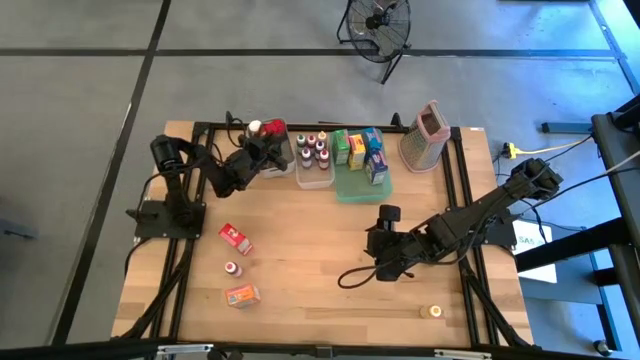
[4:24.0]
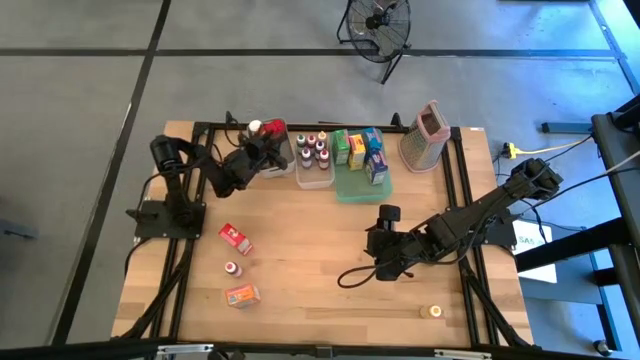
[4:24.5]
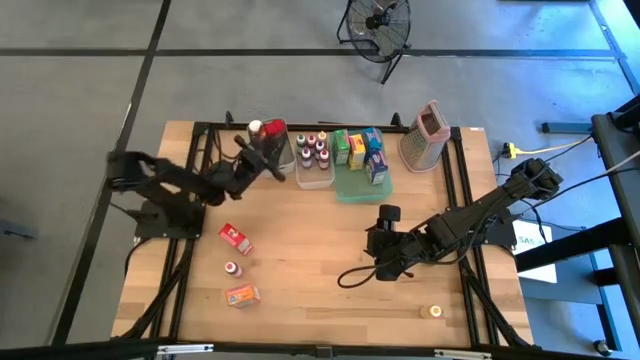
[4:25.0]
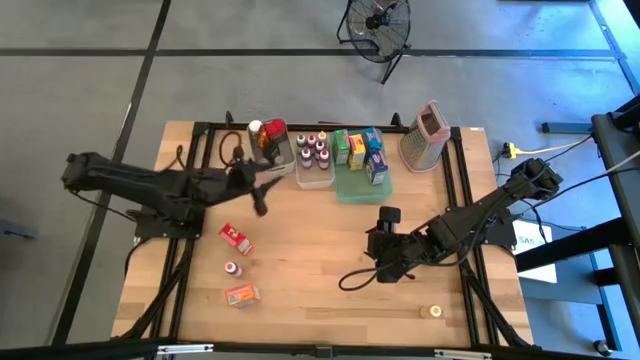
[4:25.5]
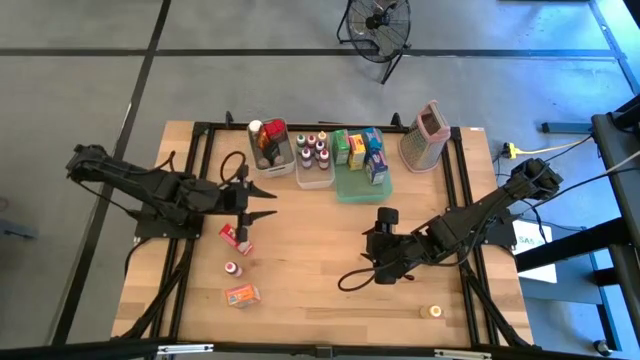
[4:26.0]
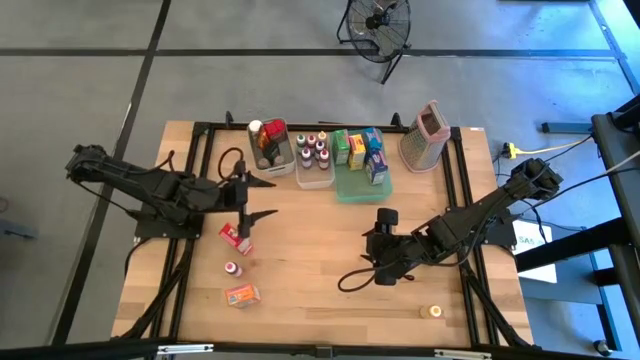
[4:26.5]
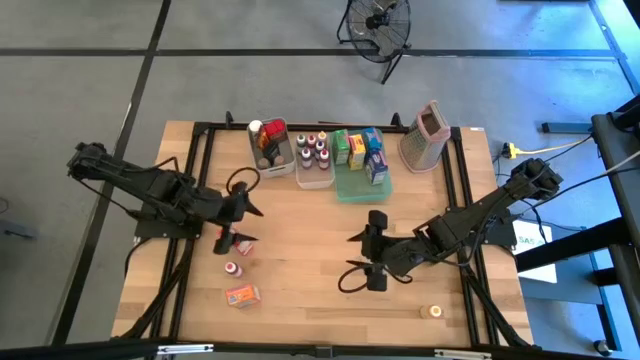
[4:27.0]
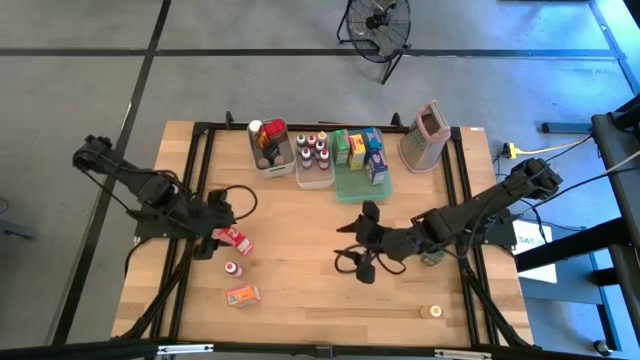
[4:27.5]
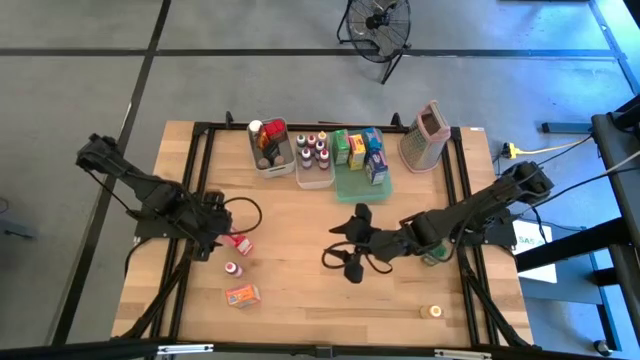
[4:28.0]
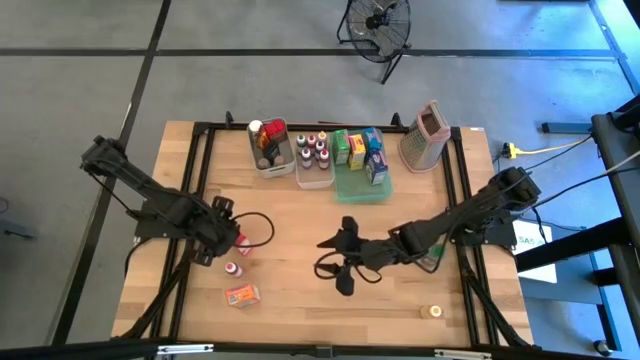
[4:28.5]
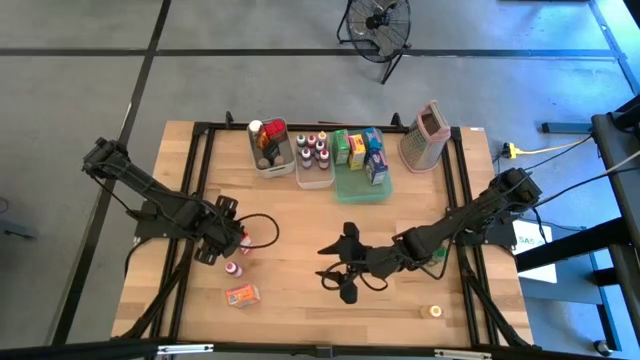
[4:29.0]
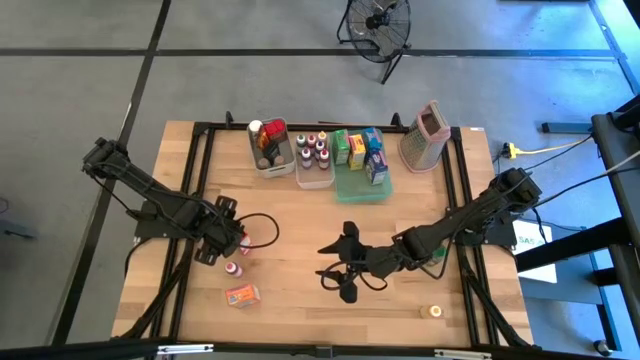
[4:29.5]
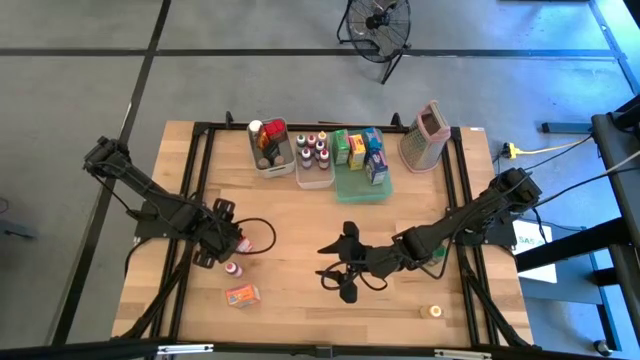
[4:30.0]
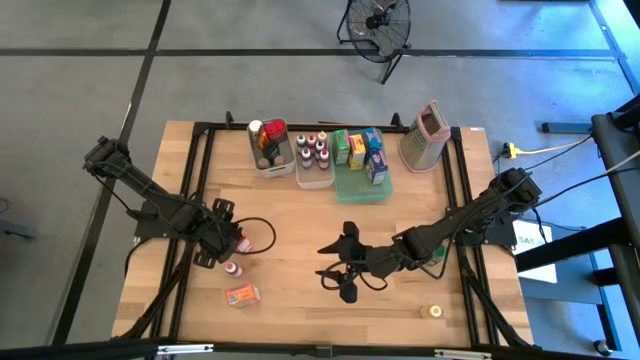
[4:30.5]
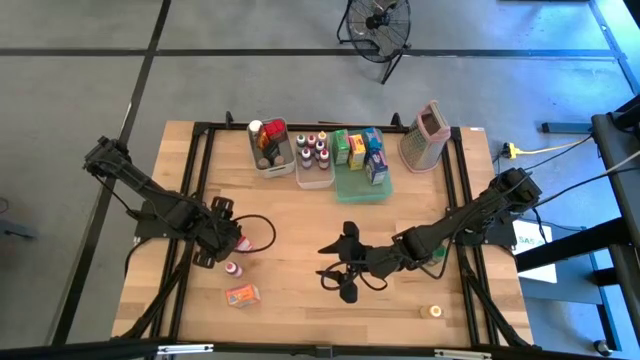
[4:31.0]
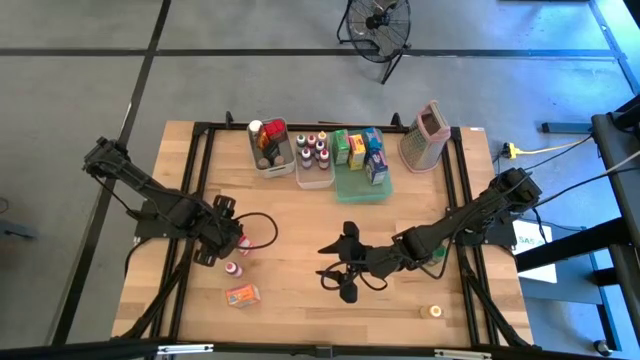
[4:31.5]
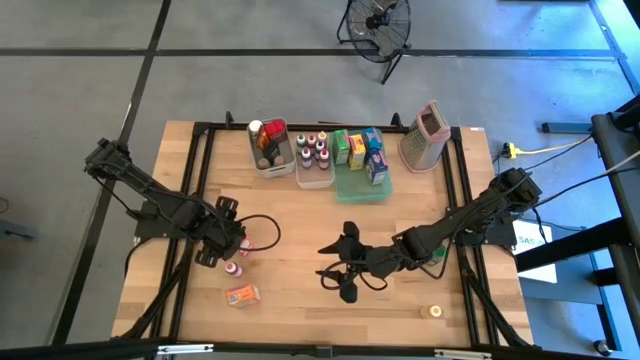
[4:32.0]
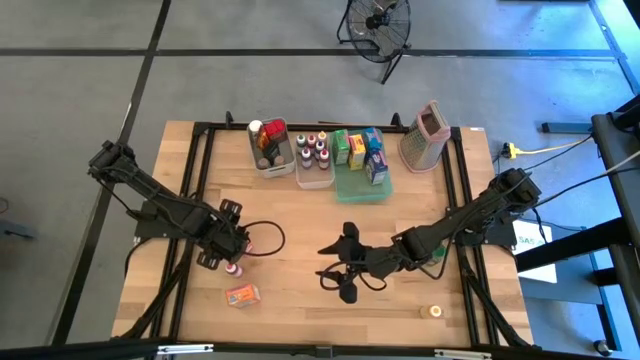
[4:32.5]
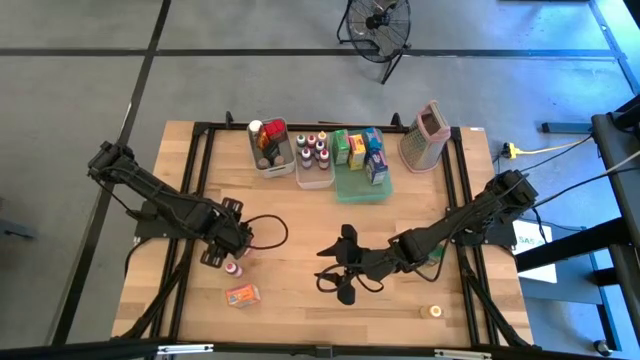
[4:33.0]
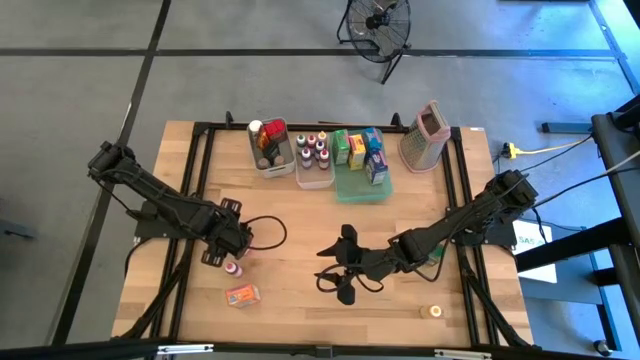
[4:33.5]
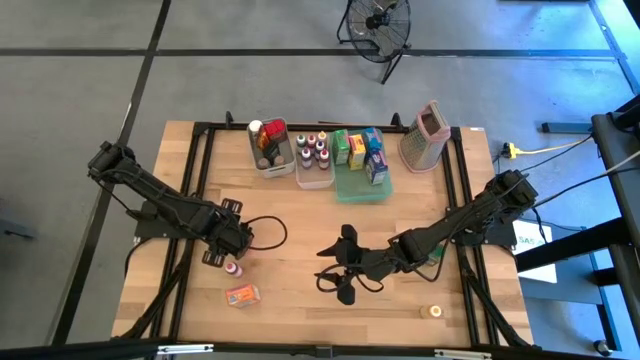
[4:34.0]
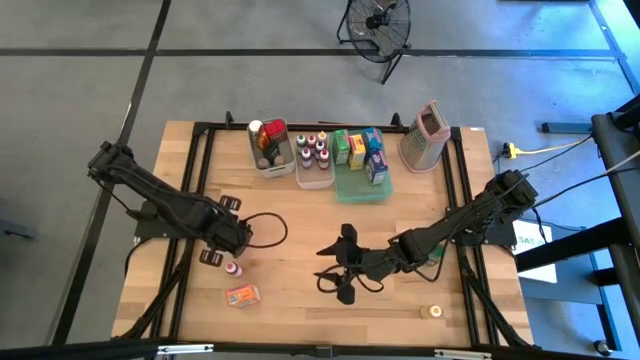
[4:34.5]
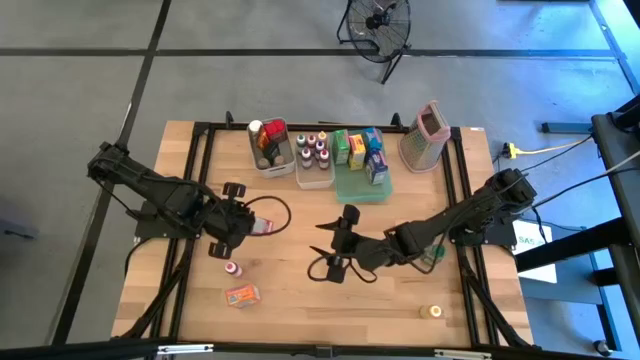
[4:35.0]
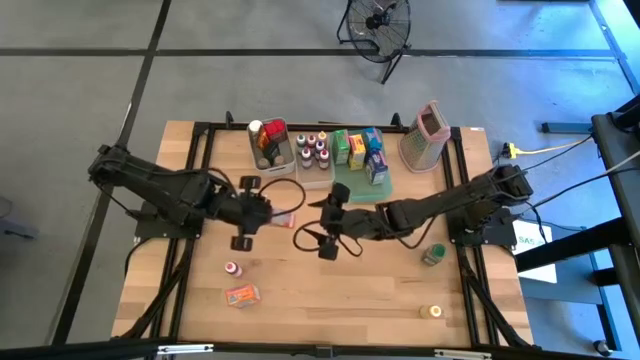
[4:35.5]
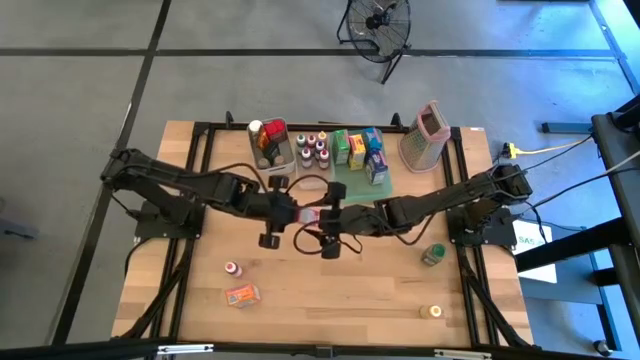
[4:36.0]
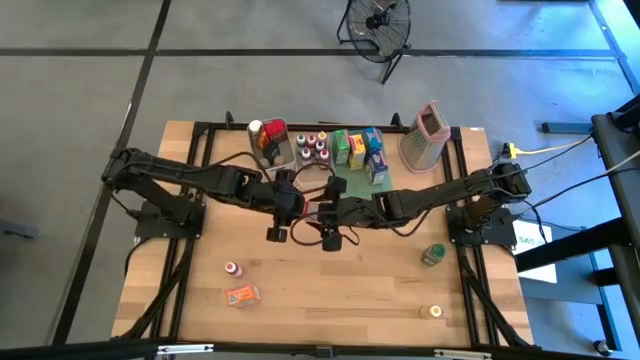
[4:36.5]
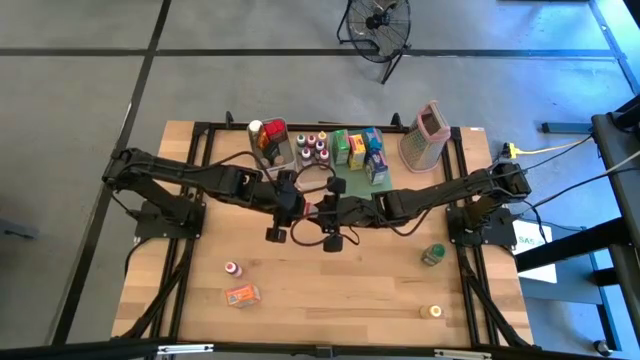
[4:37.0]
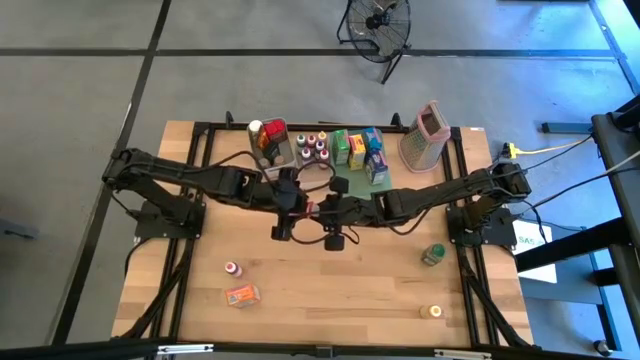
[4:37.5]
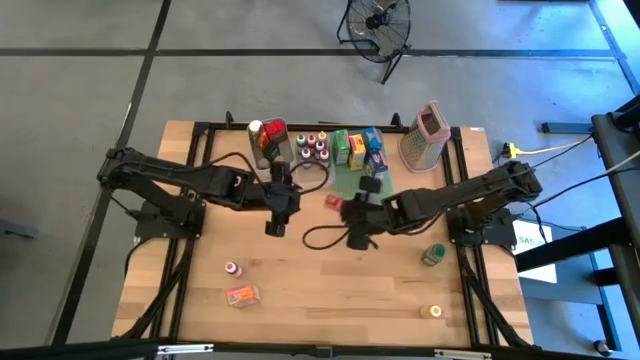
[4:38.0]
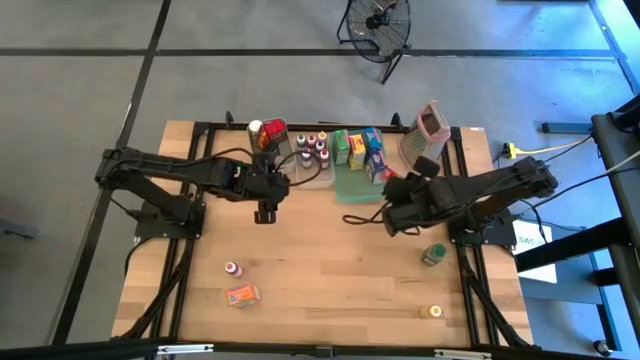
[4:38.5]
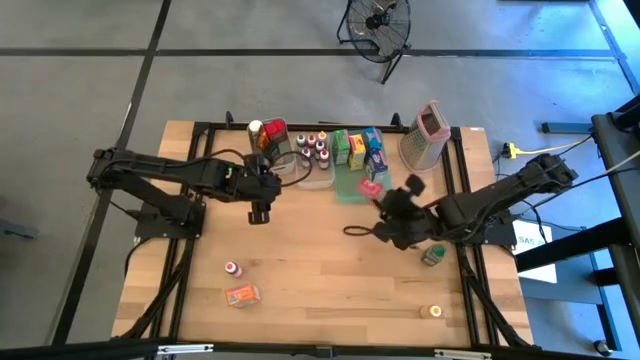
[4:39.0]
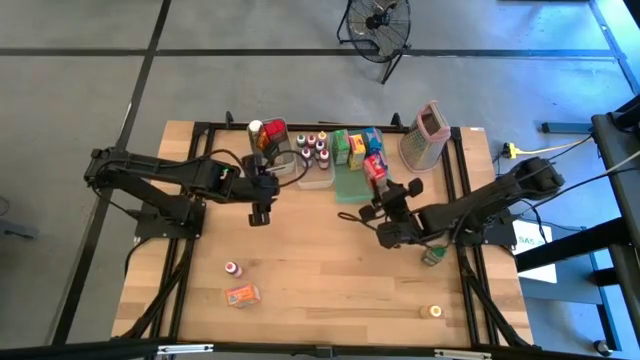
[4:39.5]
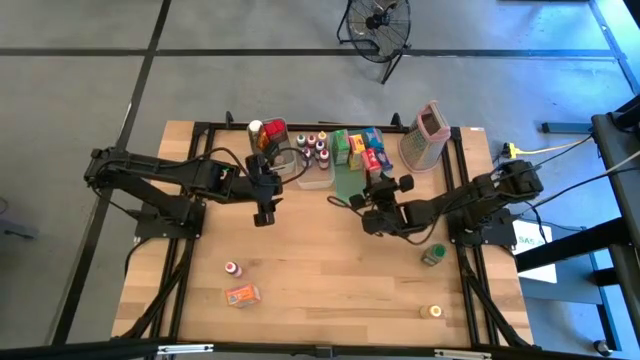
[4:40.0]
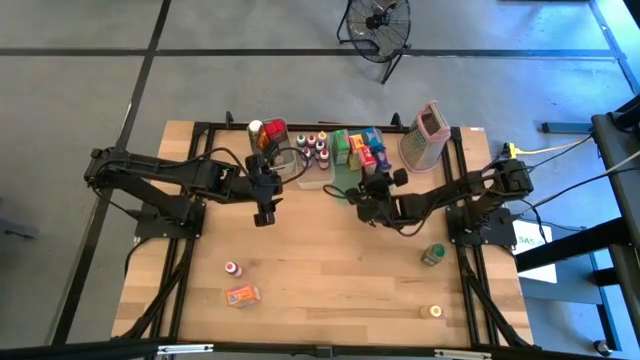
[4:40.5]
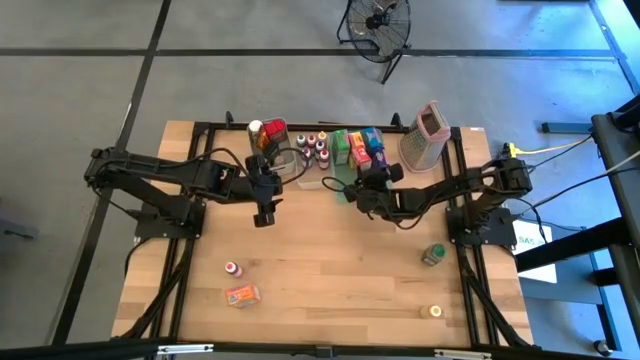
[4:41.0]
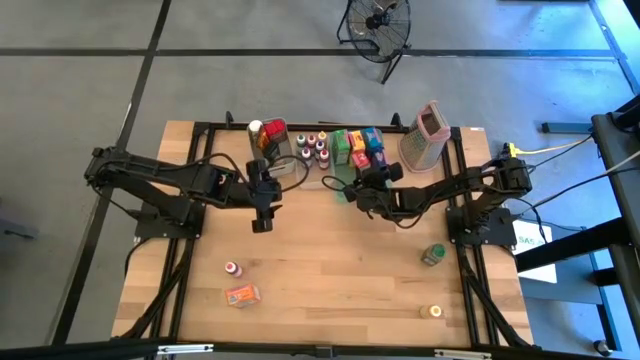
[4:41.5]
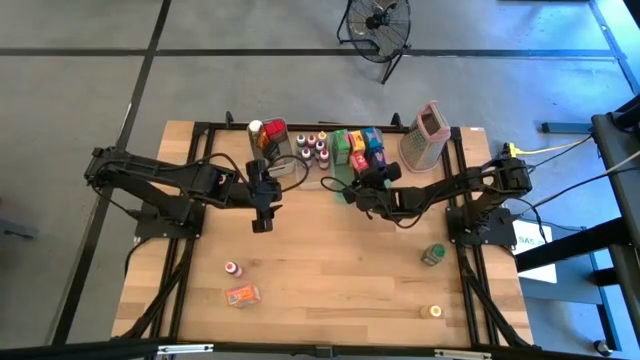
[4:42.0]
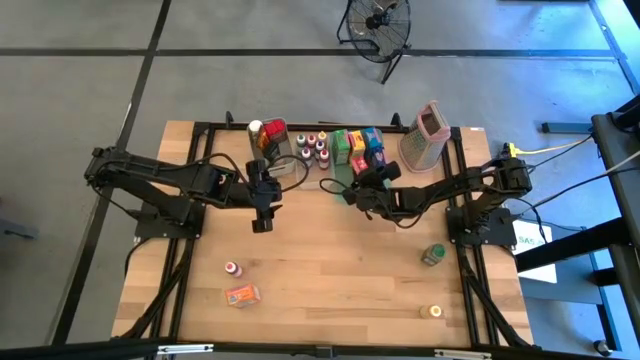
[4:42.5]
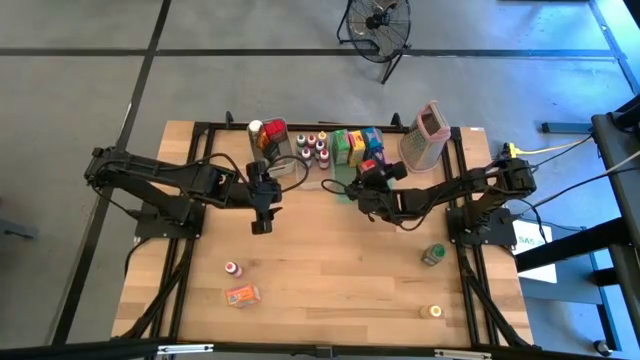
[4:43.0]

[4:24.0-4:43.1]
Task: Pick & Place Kitchen Items
Put the red cereal box into the green bin

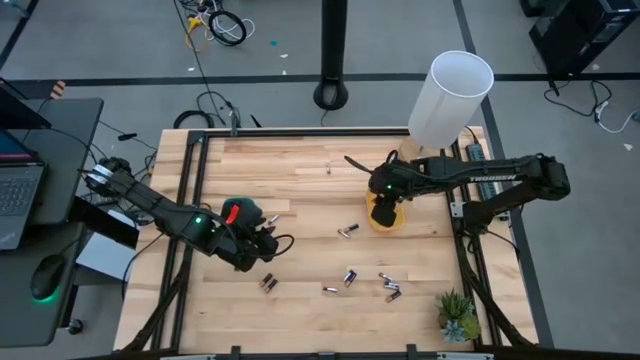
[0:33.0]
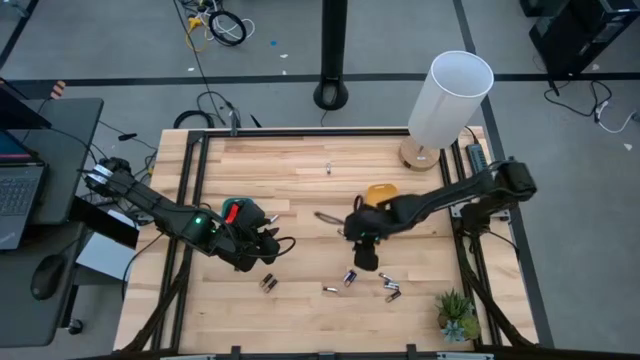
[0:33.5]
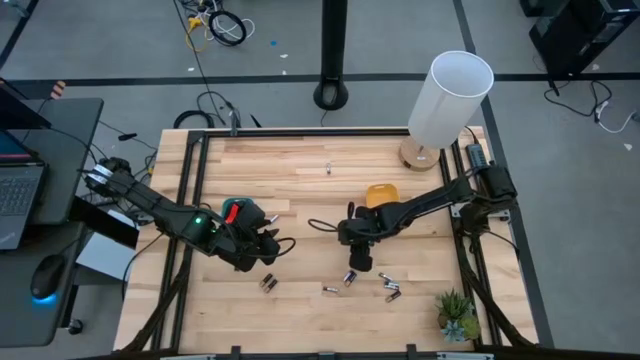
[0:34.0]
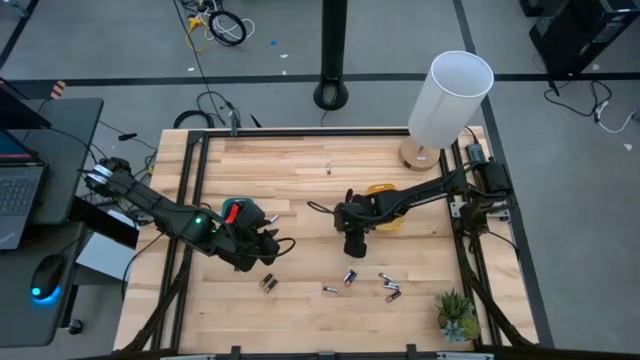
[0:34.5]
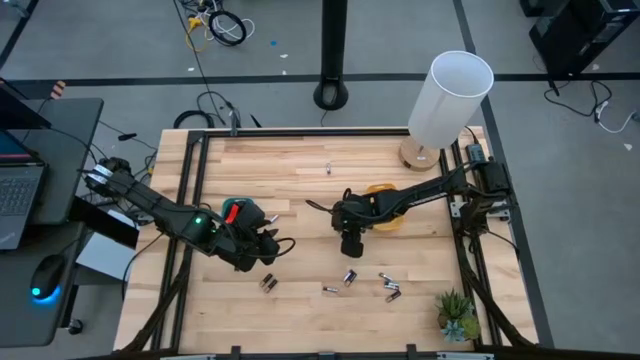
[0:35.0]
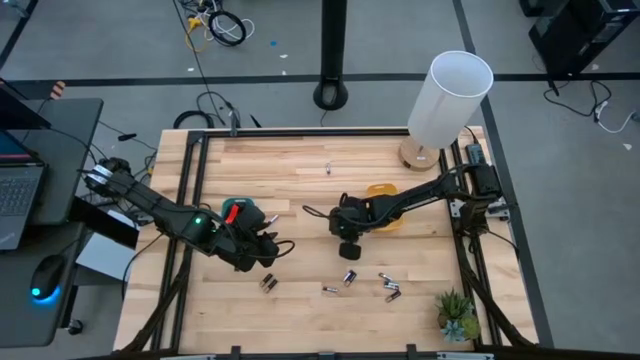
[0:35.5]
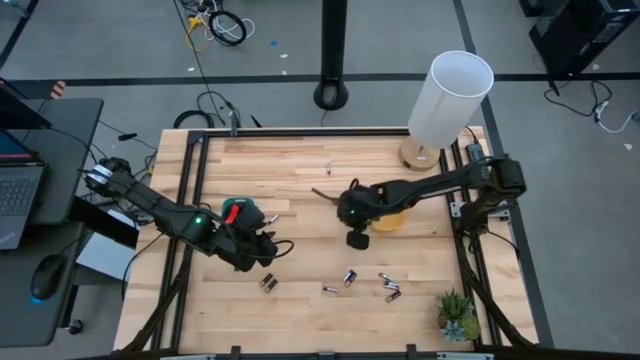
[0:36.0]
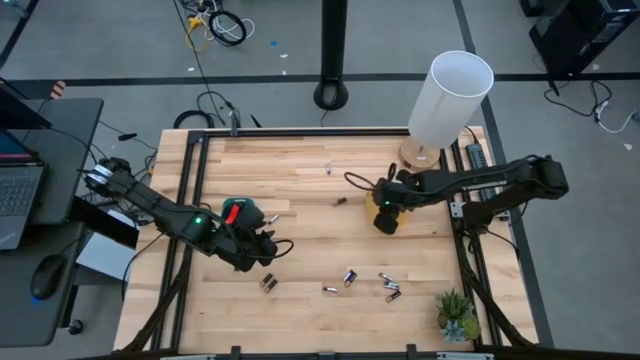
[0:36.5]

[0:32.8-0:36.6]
Task: Sort batteries
Put the silver battery into the yellow bin
